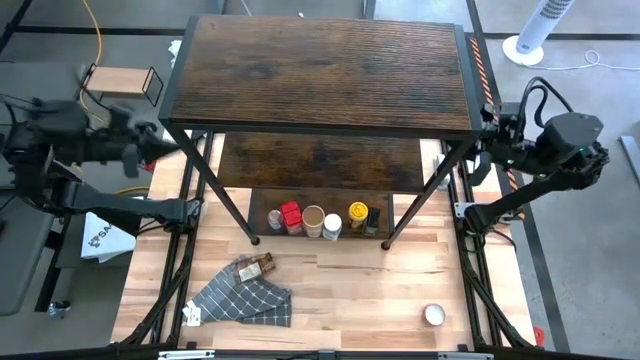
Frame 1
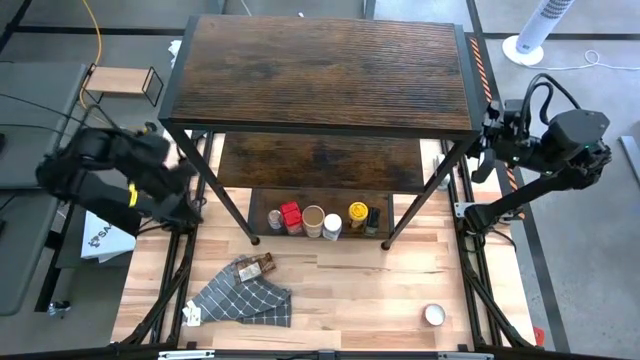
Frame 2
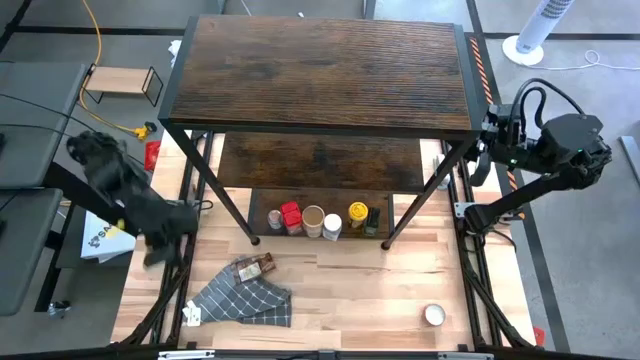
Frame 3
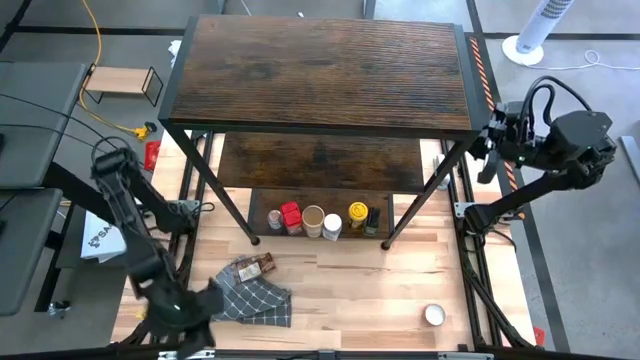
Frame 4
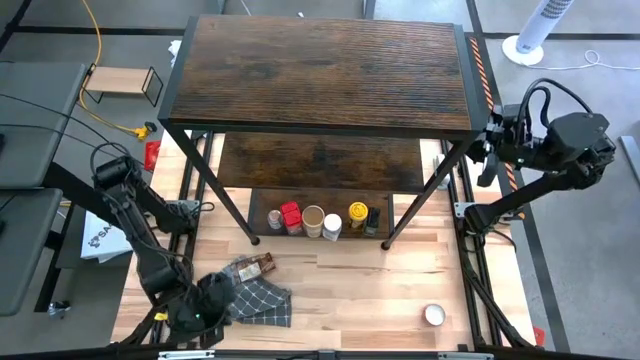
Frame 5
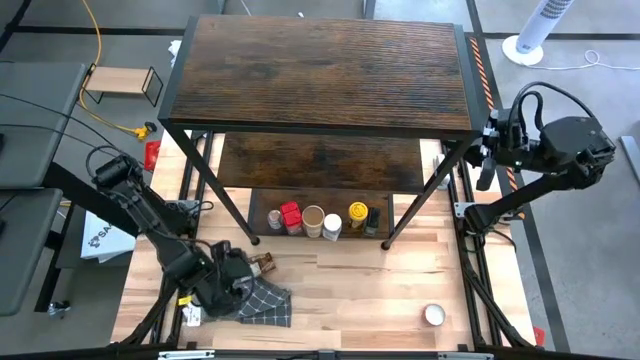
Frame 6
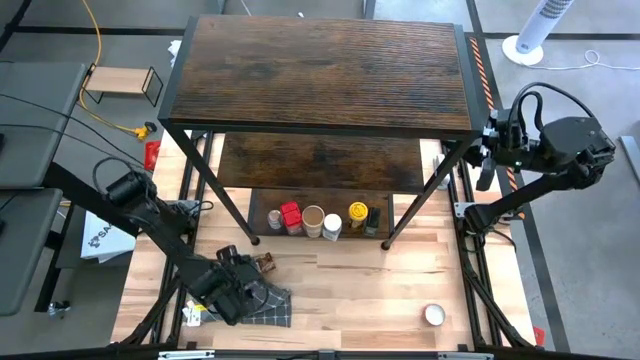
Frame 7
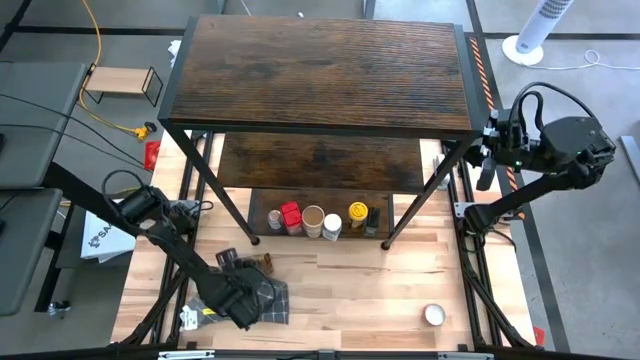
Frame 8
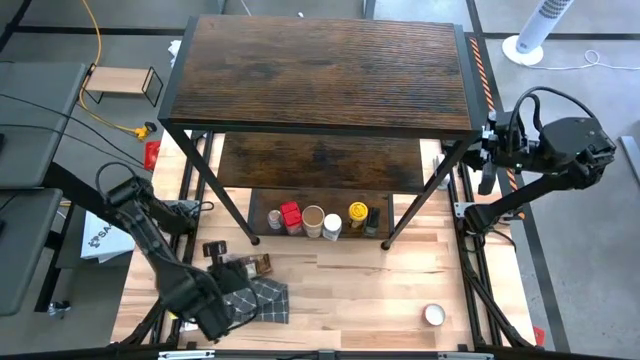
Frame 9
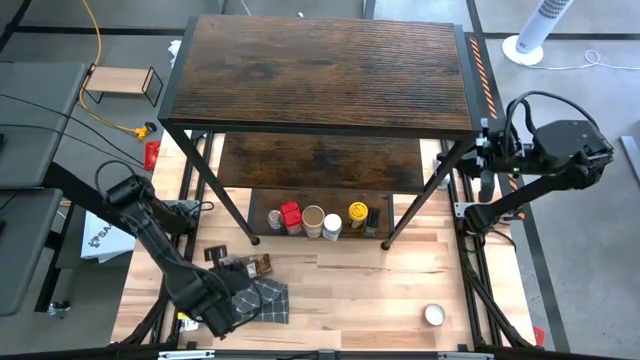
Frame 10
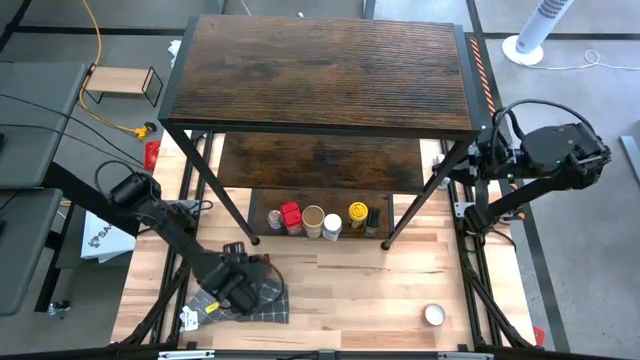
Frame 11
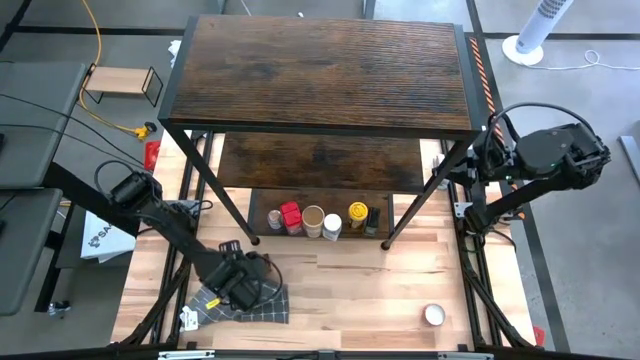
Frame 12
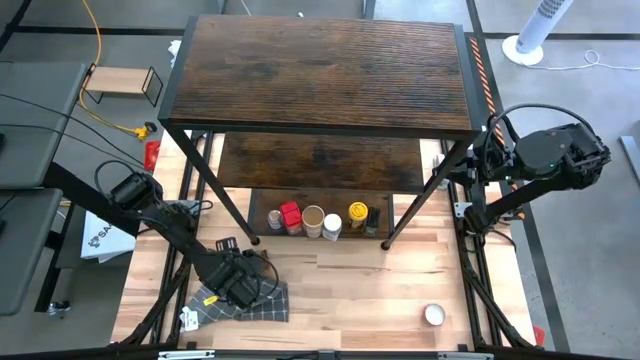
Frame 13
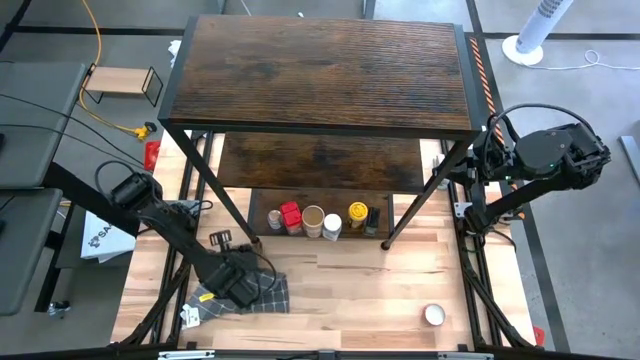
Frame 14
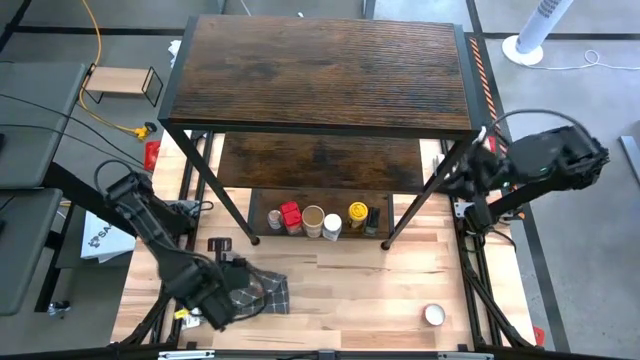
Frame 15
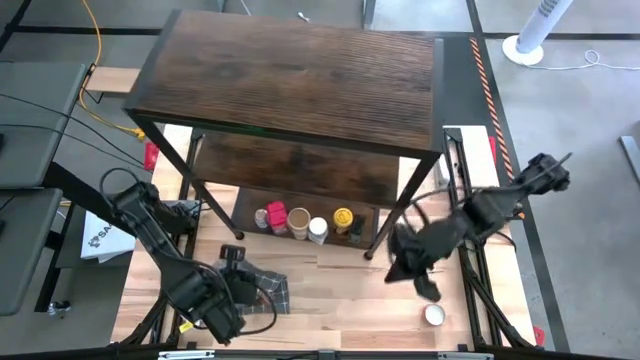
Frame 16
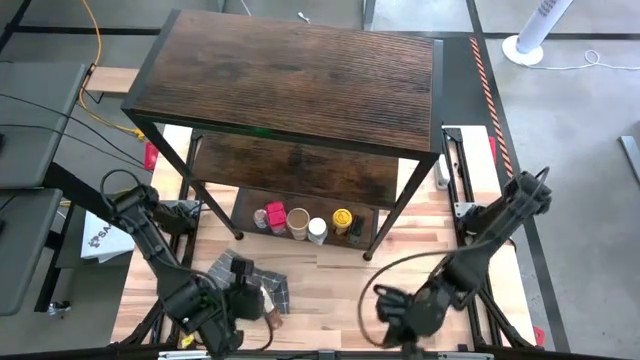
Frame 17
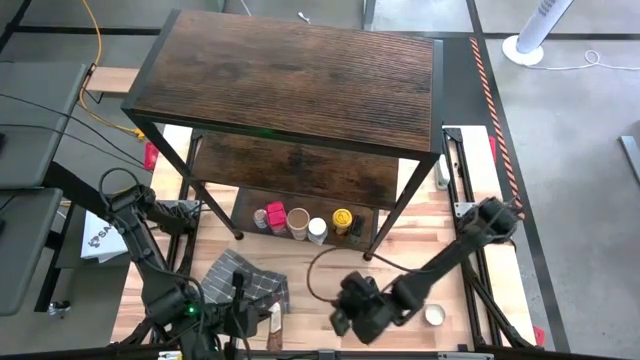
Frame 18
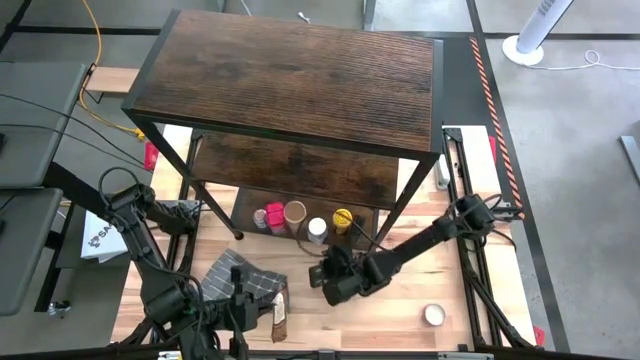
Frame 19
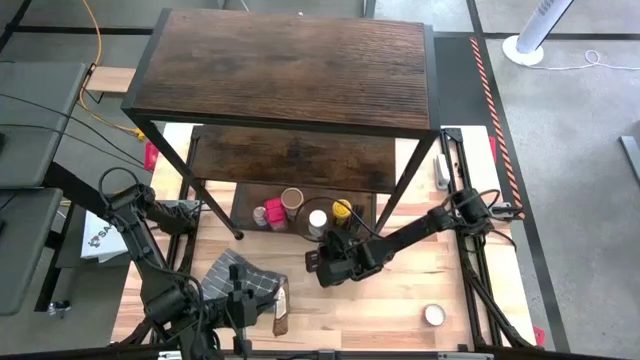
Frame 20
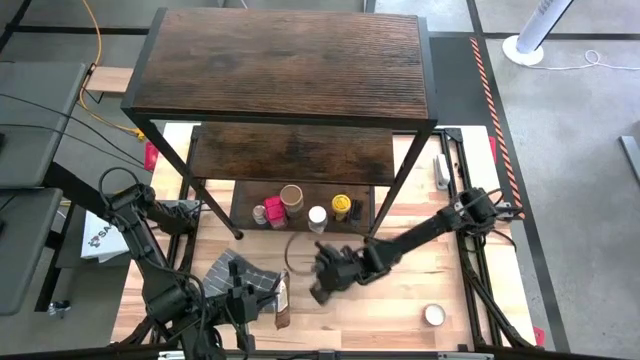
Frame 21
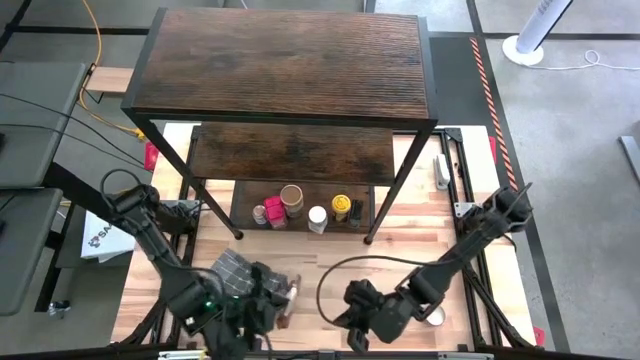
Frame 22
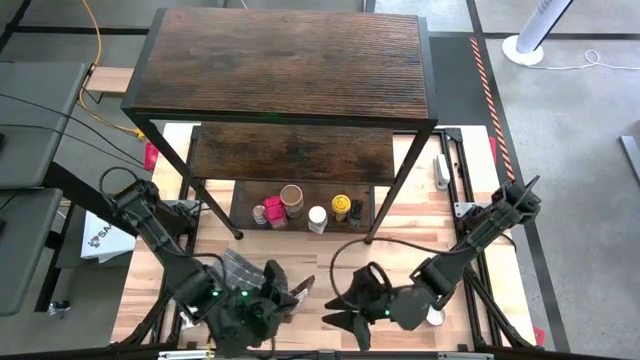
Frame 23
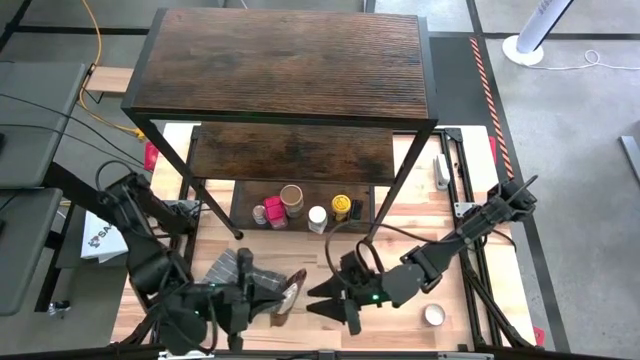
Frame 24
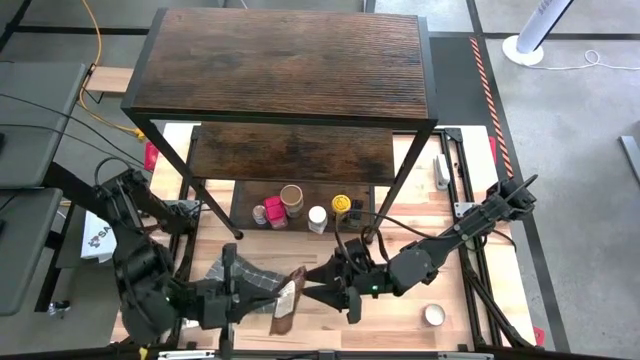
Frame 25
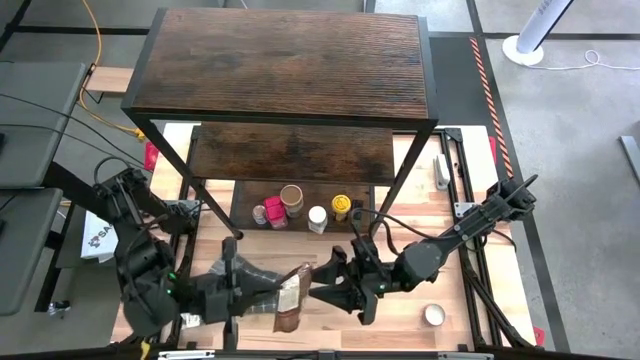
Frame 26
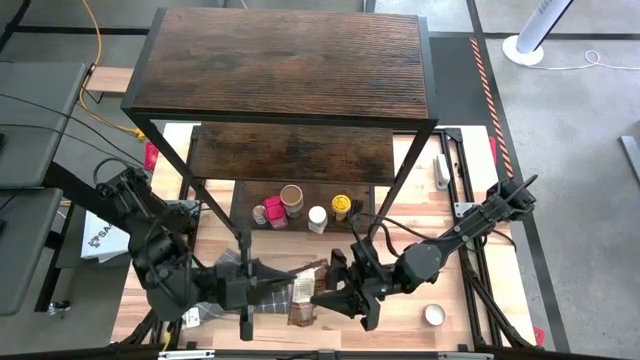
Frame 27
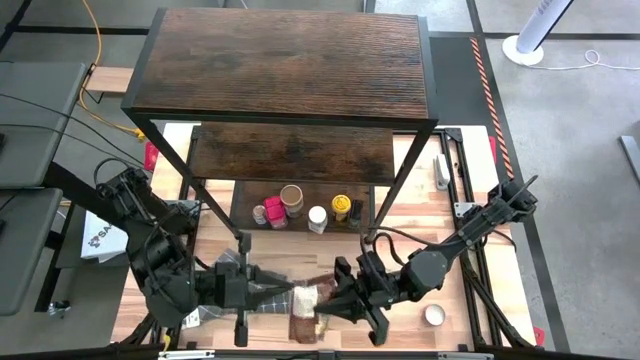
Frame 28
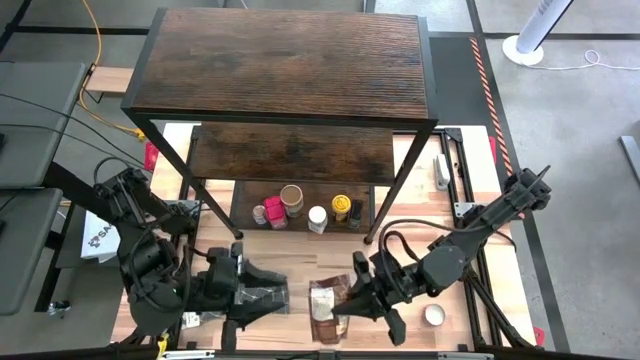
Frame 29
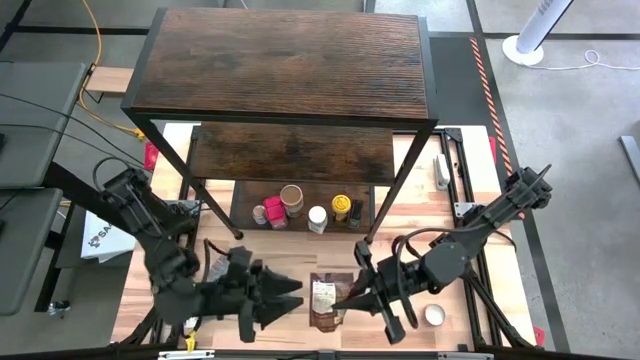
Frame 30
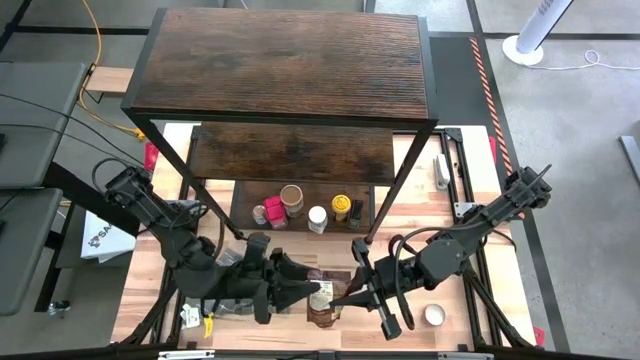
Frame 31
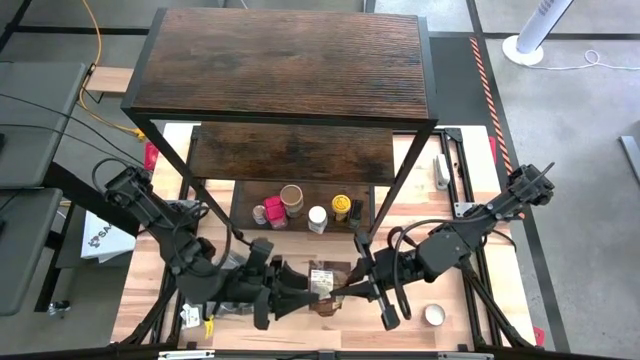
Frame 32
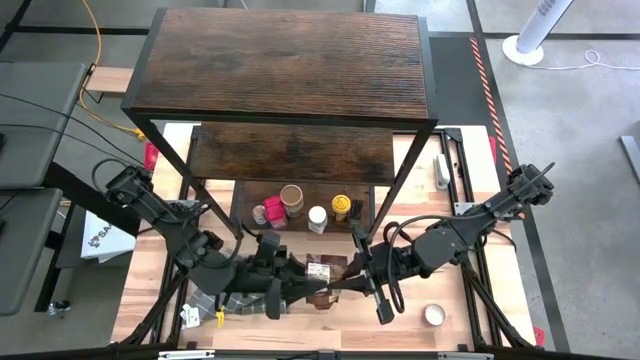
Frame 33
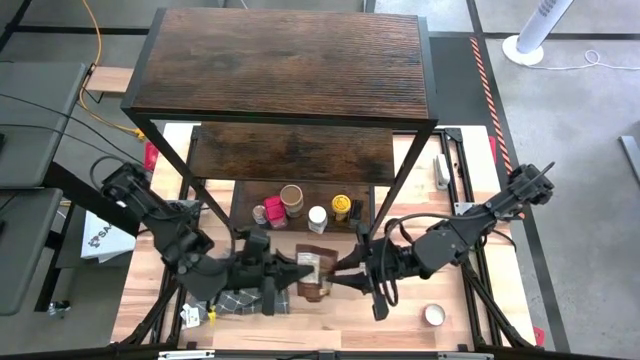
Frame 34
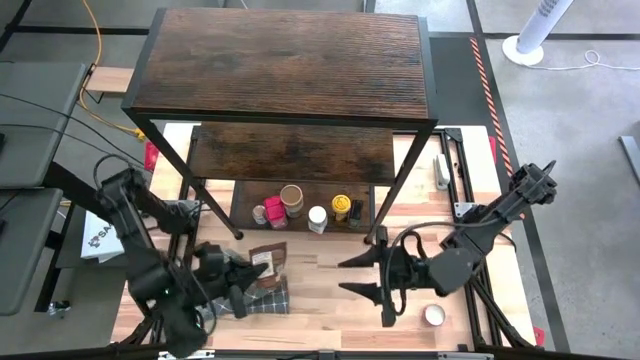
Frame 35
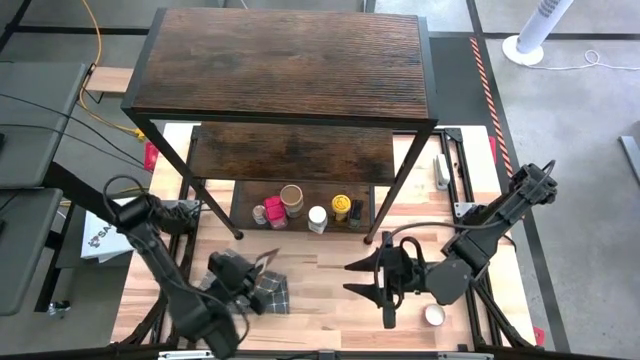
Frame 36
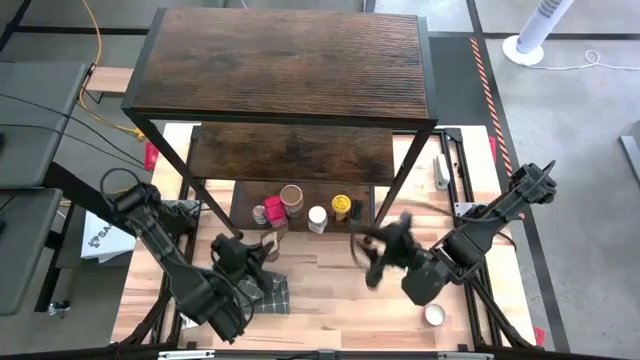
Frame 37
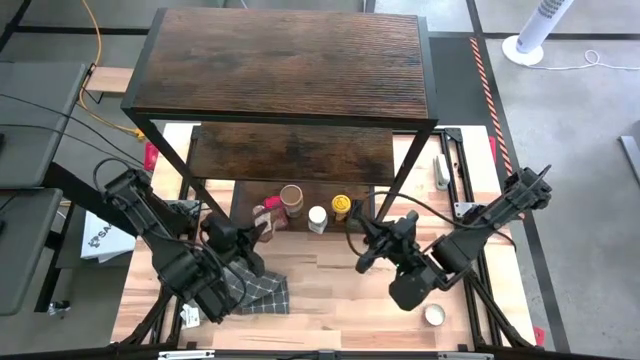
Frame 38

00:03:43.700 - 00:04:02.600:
Task: Shelf spices
Put the orange seasoning pack on the shelf

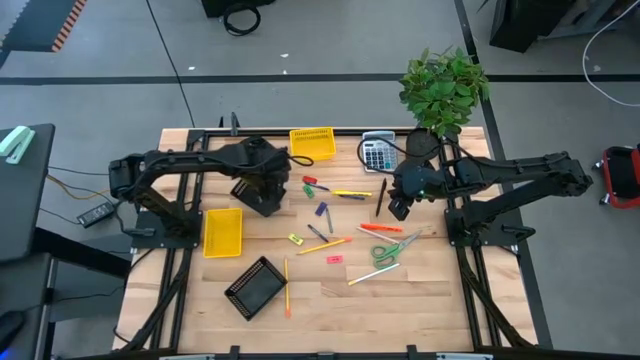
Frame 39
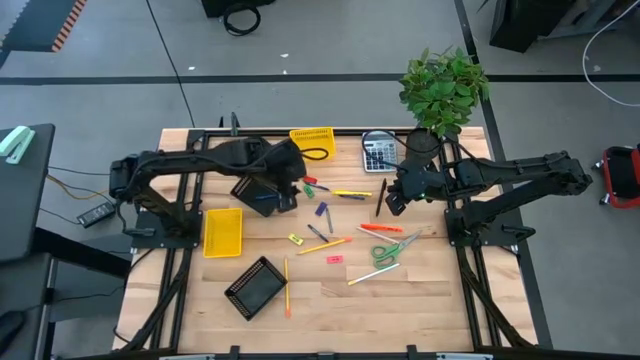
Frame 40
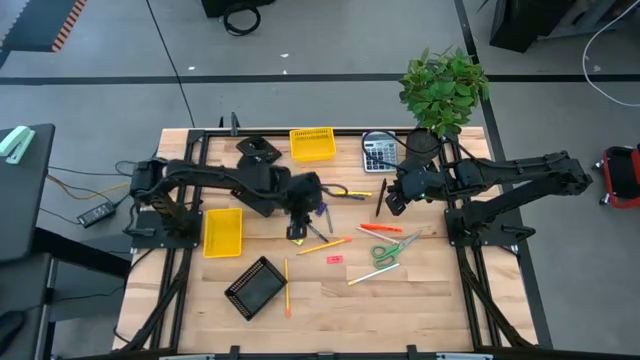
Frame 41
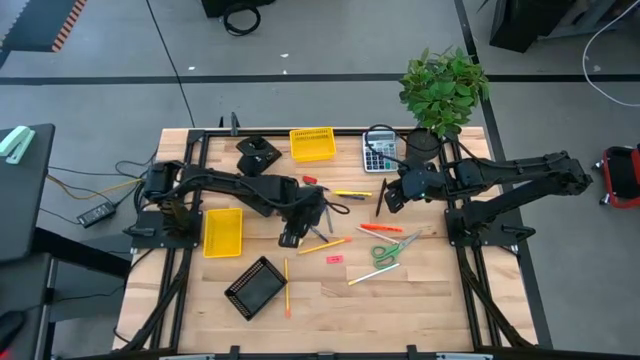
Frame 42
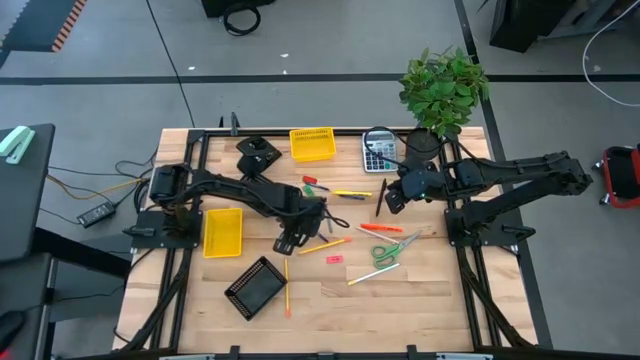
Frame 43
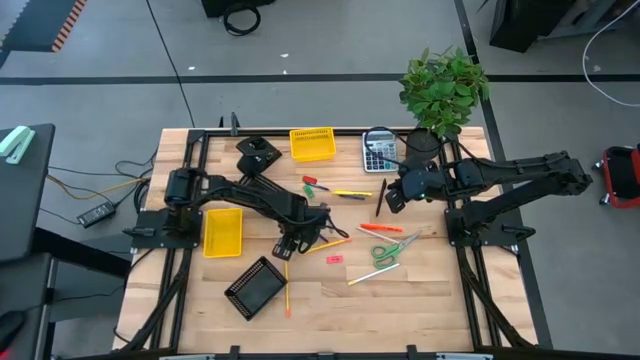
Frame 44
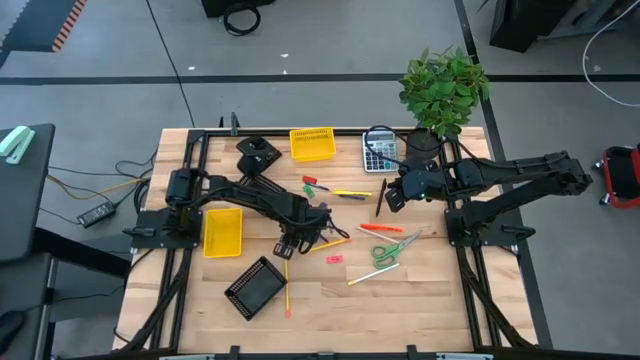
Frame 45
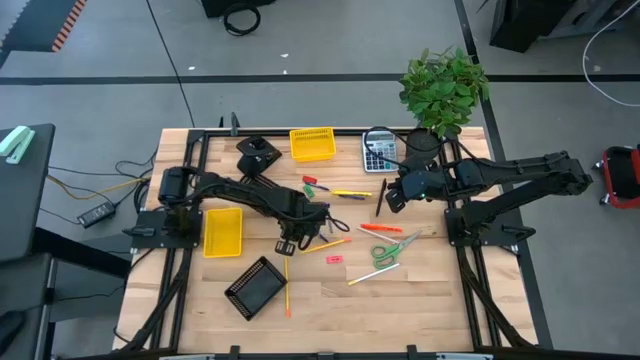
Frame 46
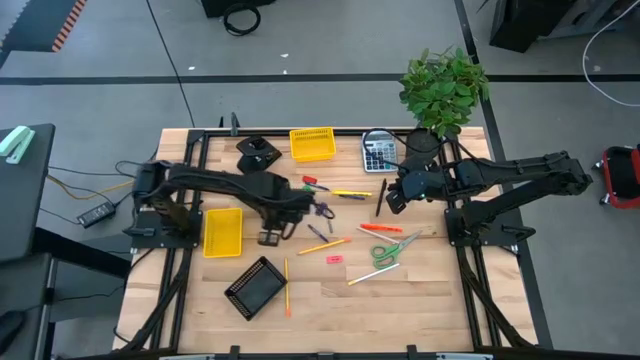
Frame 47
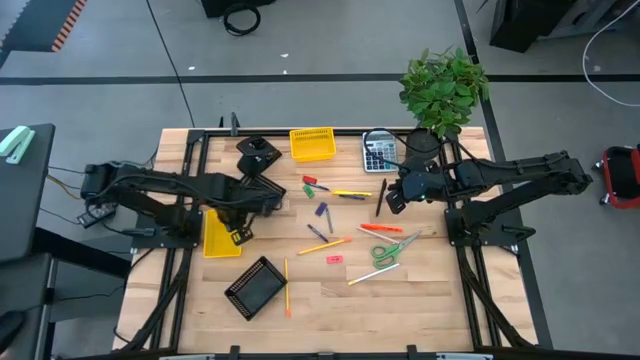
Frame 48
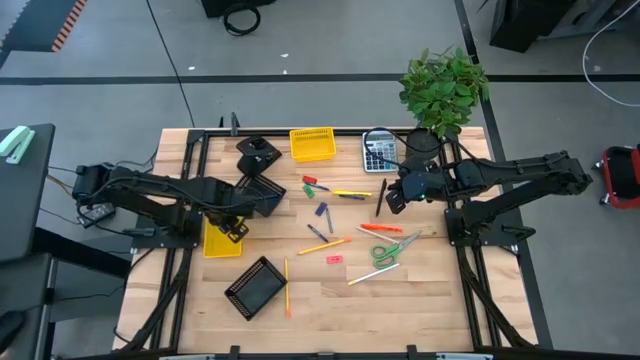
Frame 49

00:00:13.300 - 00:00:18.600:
Task: Sort crayons/erasers/pens/pencils in bins
Put the yellow eraser into the bottom yellow basket
